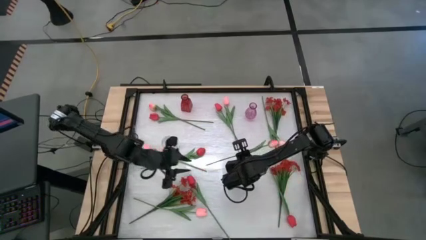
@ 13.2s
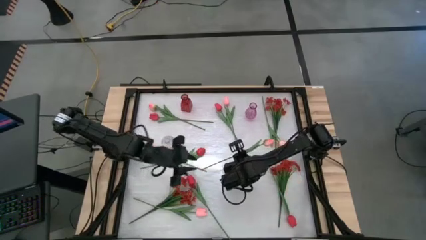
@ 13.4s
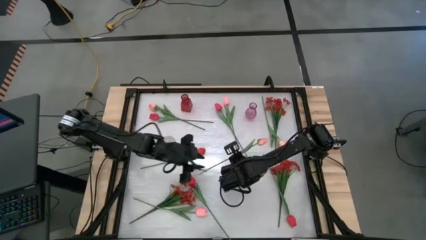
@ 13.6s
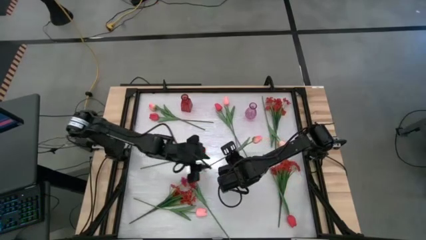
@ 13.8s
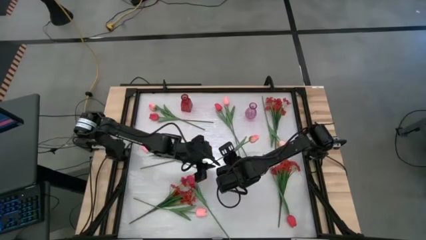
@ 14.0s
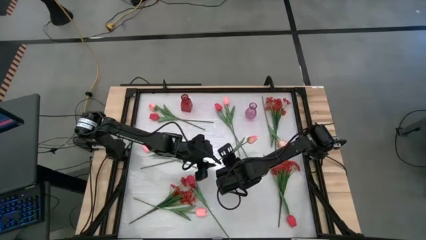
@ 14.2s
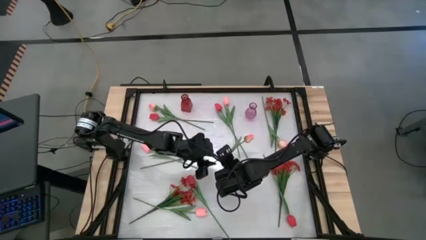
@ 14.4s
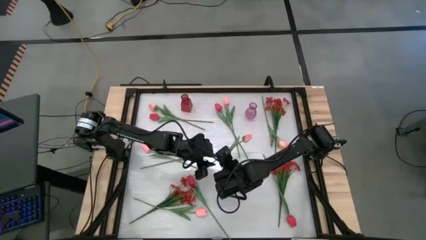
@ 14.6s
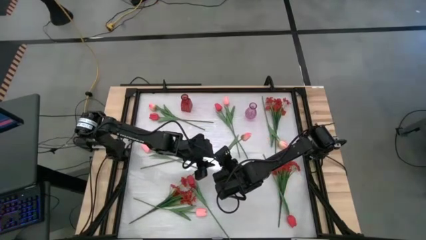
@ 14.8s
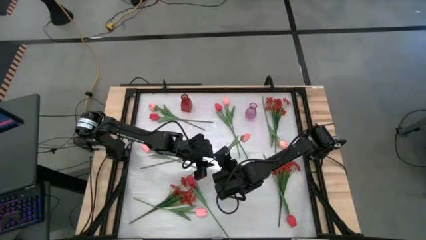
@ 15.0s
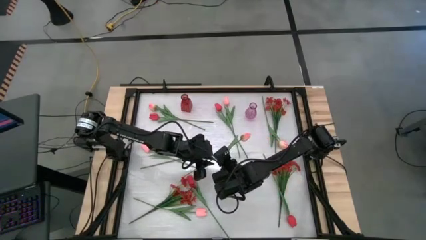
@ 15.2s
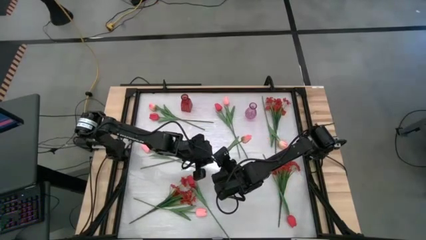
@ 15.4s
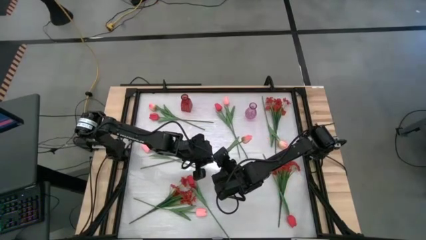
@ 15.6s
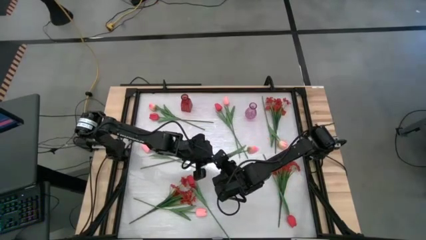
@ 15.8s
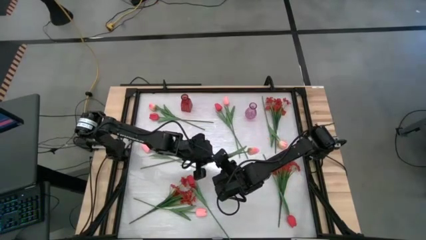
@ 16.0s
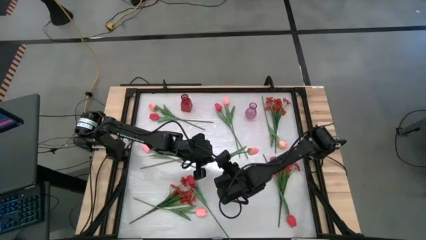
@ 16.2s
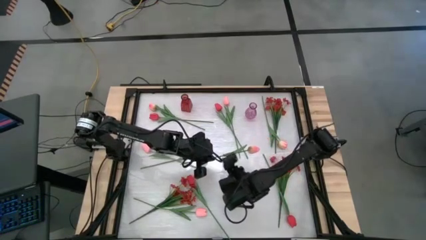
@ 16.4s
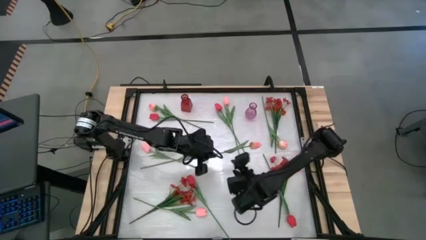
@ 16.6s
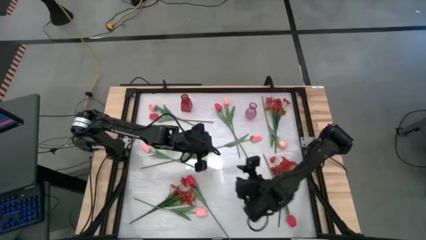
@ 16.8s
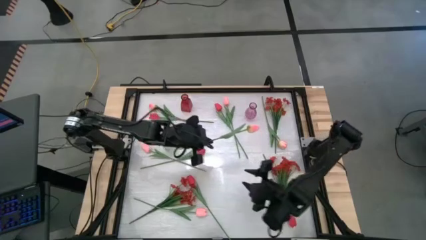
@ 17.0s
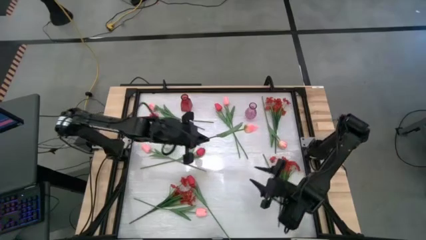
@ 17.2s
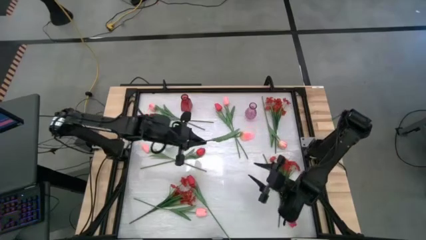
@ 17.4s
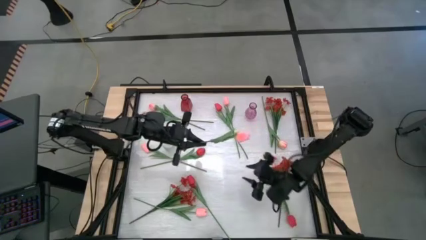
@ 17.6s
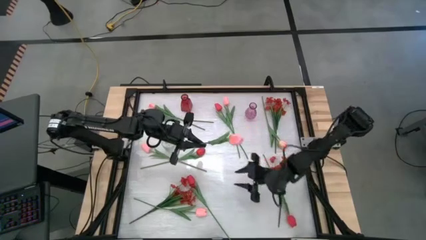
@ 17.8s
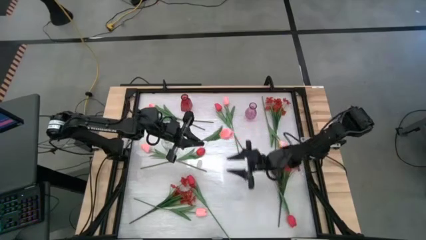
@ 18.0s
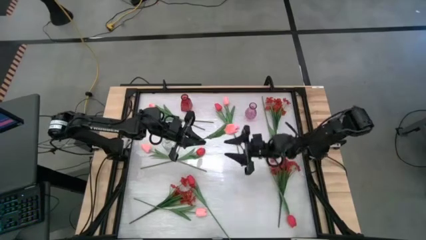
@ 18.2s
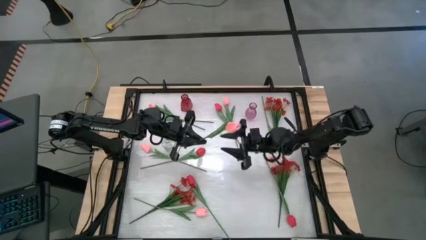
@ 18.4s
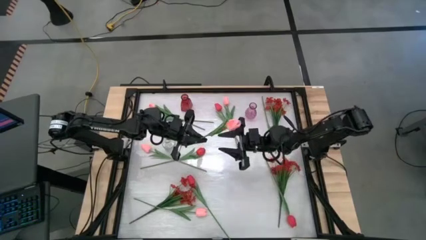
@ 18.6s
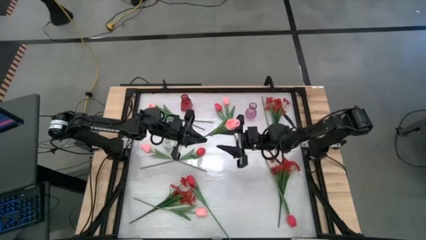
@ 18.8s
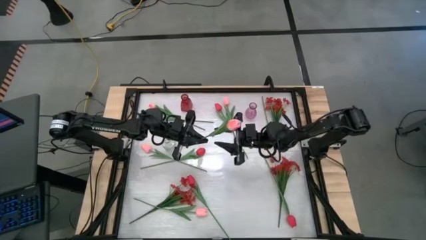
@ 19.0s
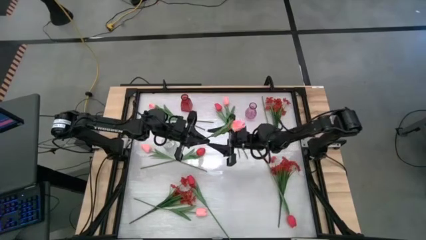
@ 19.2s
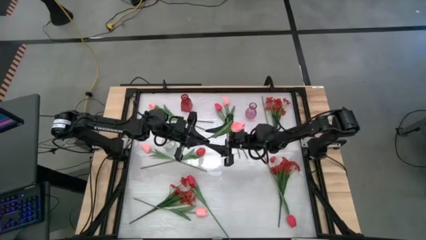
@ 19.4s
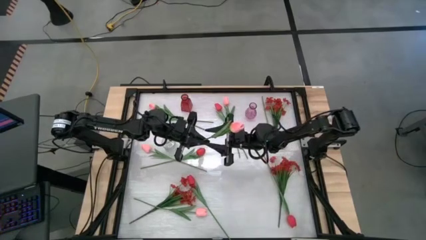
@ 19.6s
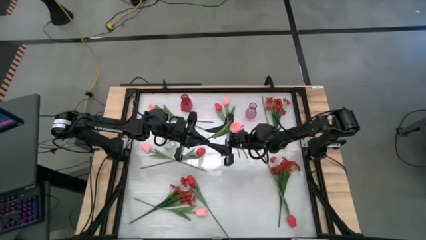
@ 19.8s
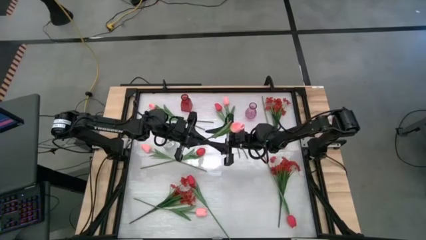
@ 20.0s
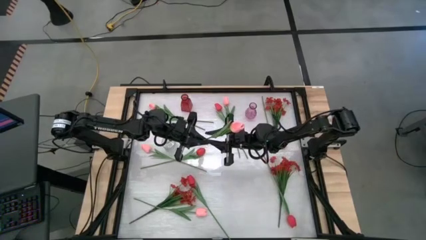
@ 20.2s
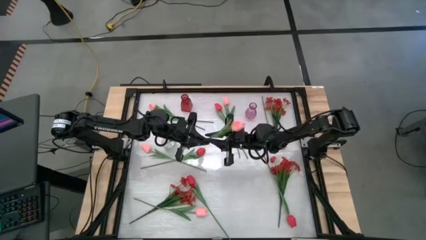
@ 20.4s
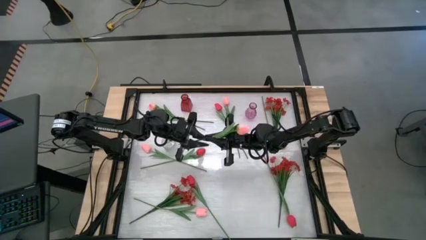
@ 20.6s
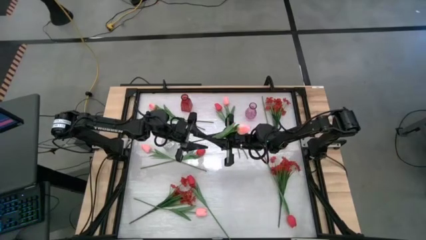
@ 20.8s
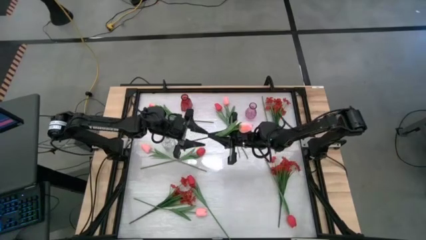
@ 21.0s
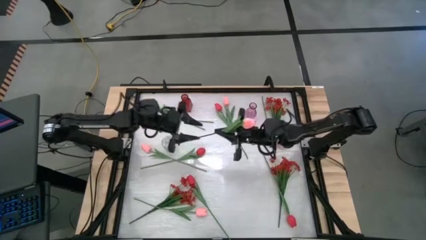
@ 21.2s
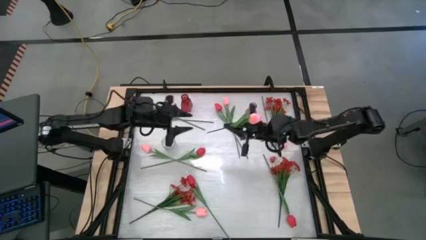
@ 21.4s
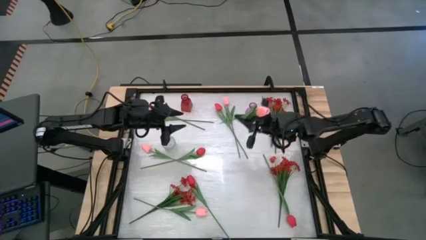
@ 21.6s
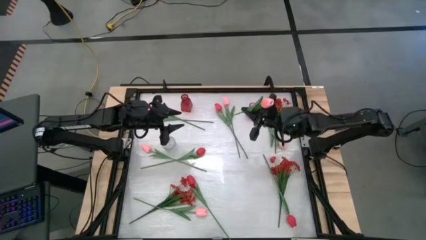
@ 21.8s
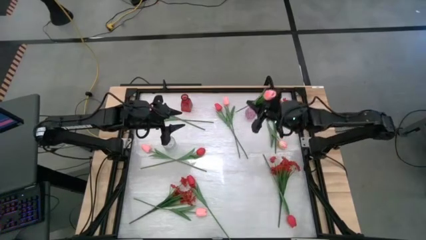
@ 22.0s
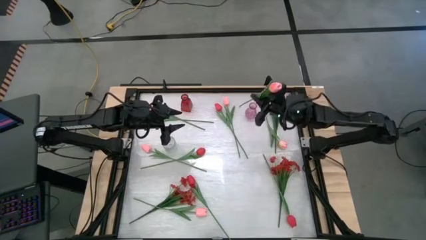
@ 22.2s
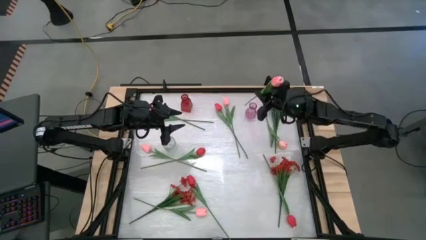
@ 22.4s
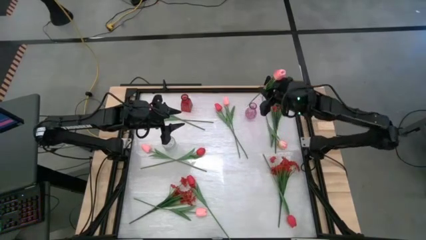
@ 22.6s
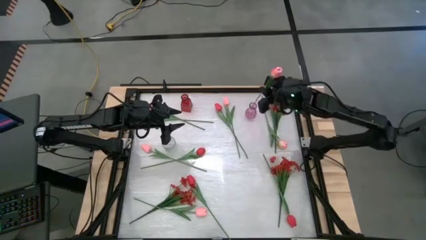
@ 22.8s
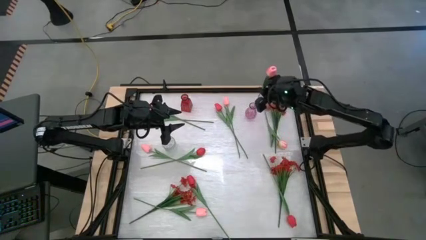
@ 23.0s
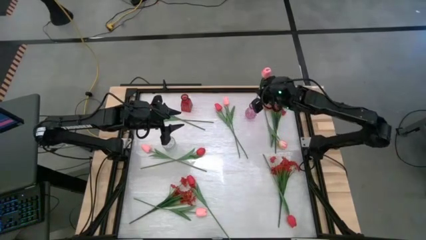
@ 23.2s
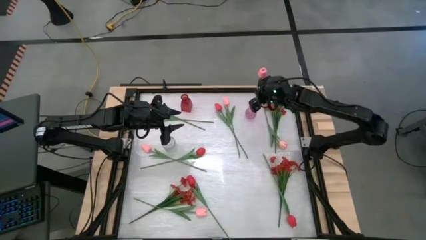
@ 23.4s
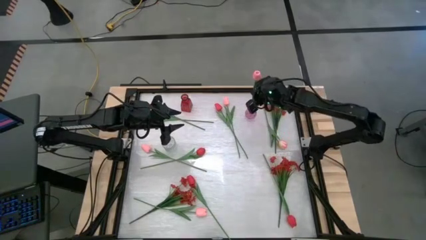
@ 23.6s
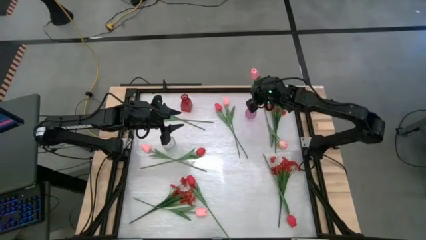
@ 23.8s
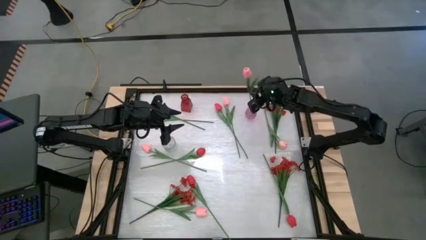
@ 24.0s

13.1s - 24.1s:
Task: Sort flowers into vase by color
Put the pink tulip into the purple vase

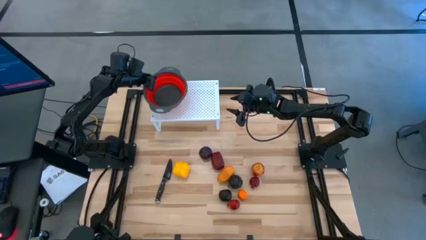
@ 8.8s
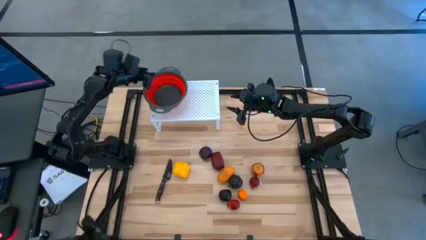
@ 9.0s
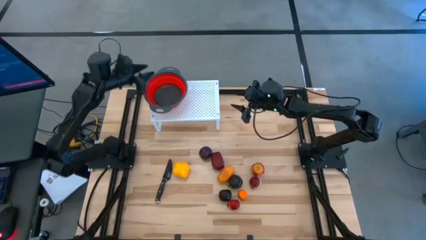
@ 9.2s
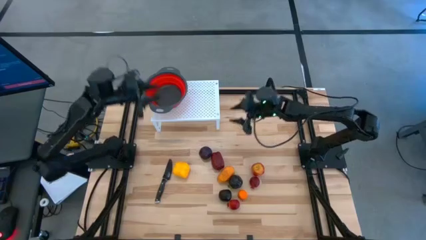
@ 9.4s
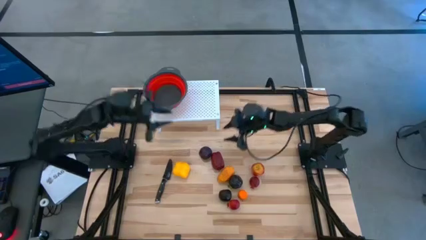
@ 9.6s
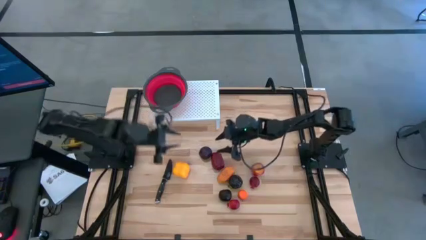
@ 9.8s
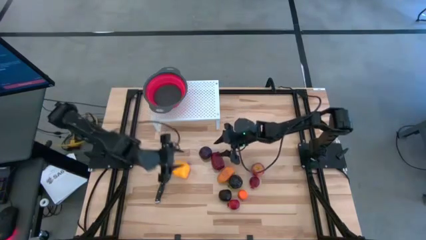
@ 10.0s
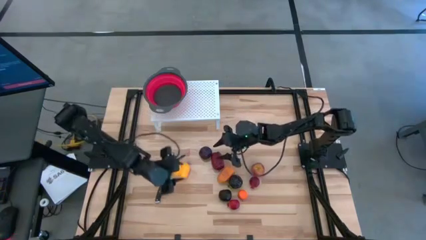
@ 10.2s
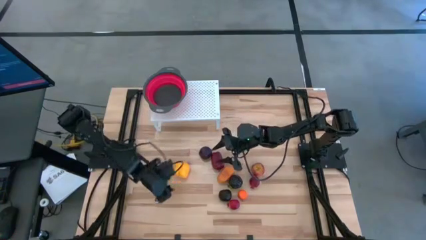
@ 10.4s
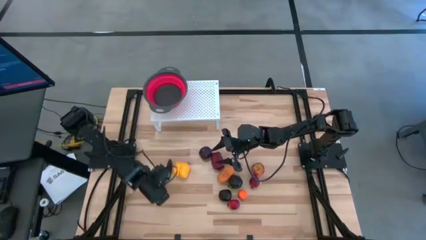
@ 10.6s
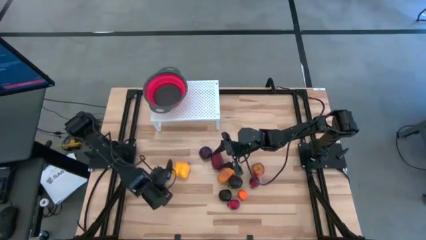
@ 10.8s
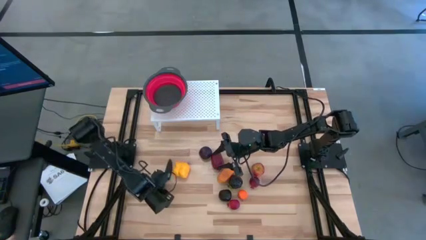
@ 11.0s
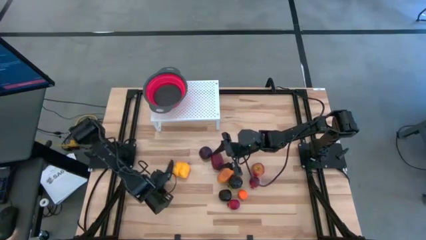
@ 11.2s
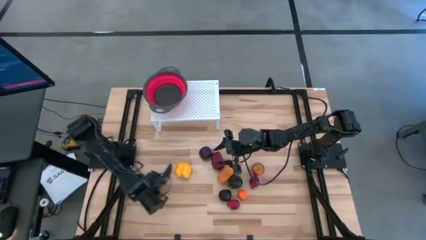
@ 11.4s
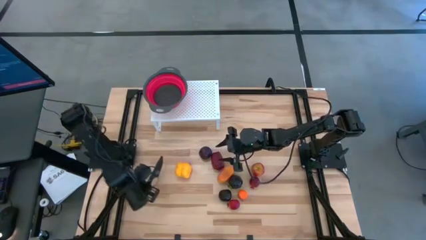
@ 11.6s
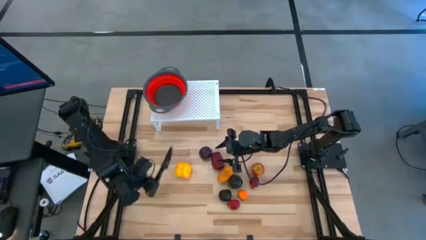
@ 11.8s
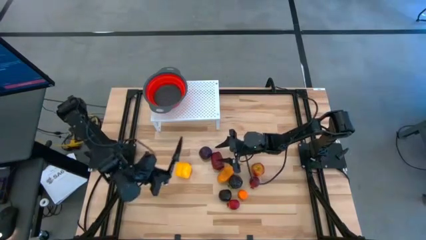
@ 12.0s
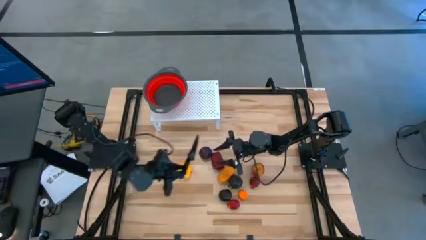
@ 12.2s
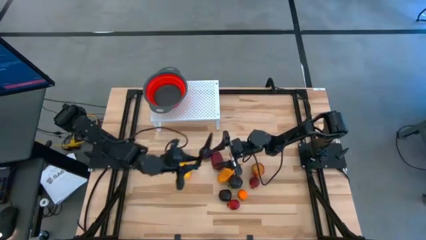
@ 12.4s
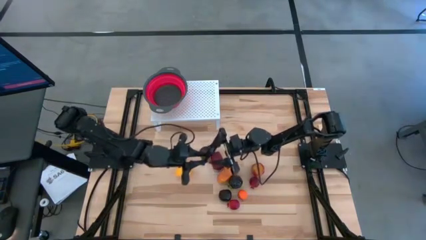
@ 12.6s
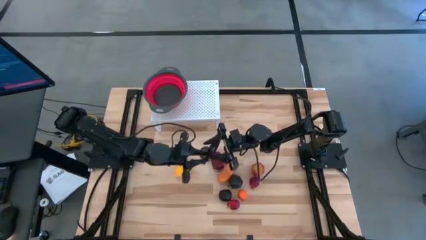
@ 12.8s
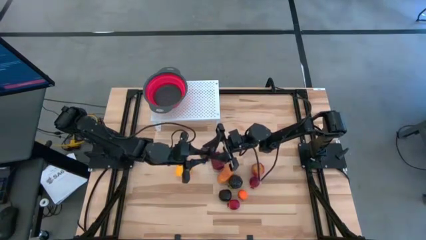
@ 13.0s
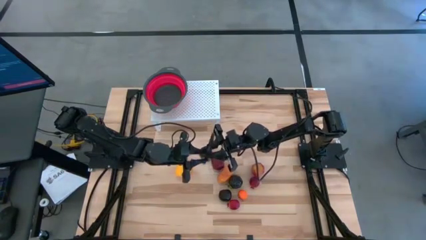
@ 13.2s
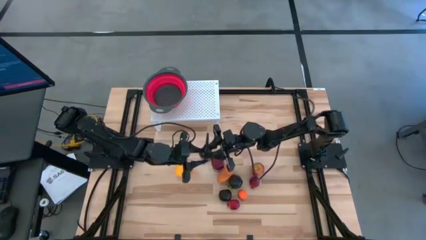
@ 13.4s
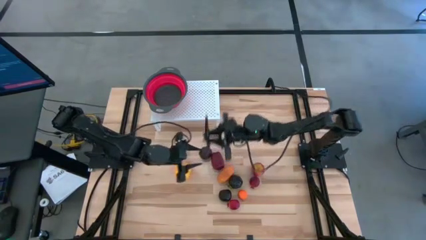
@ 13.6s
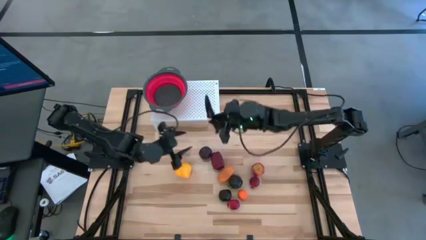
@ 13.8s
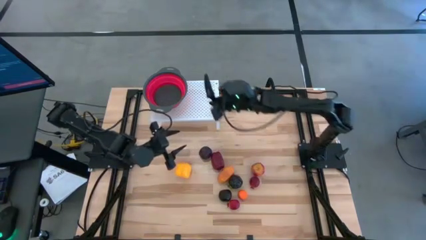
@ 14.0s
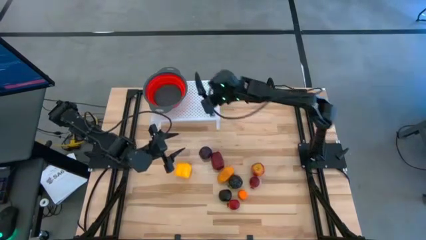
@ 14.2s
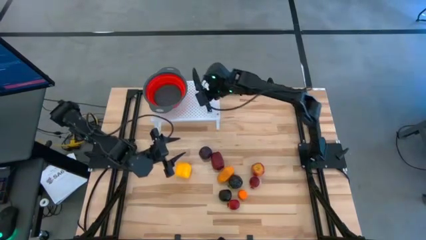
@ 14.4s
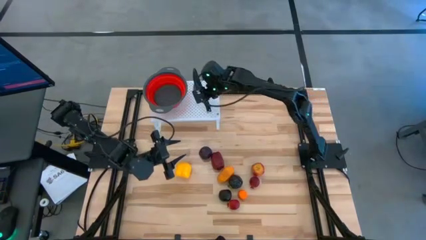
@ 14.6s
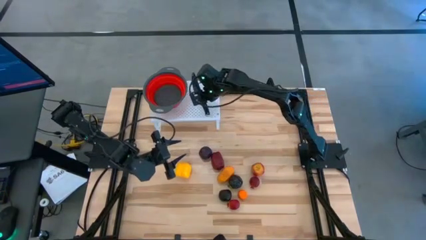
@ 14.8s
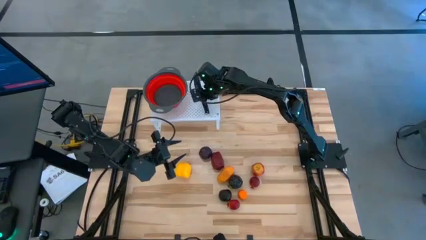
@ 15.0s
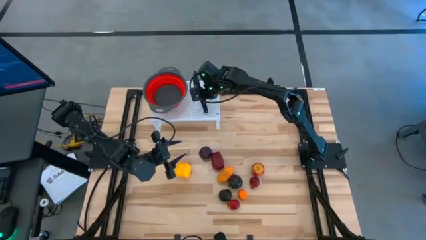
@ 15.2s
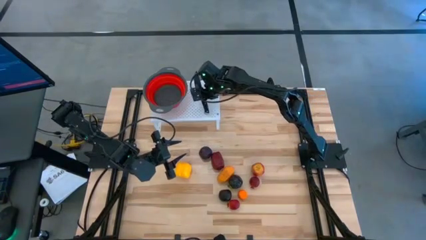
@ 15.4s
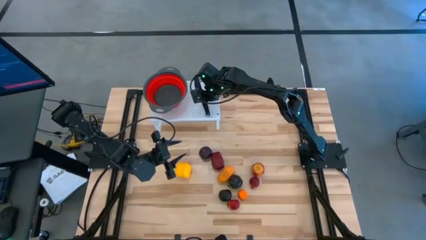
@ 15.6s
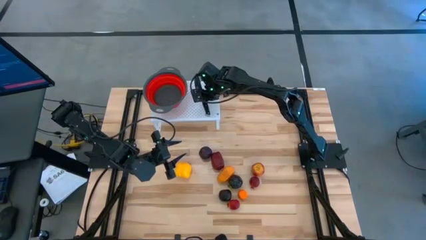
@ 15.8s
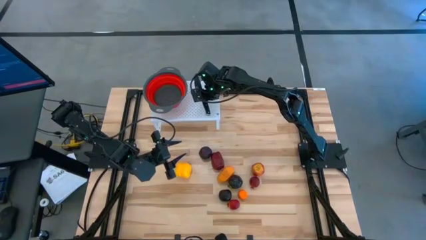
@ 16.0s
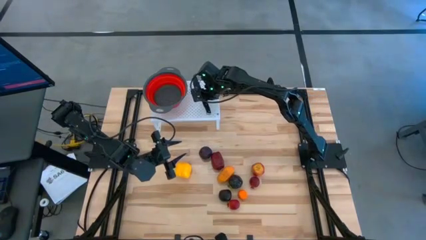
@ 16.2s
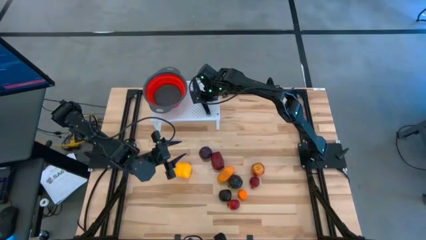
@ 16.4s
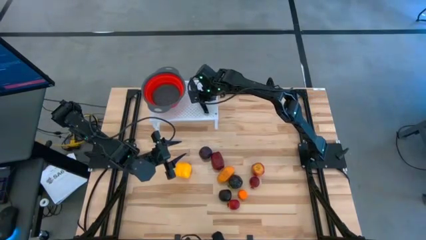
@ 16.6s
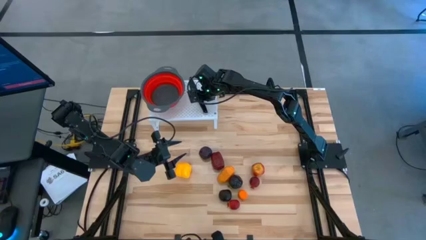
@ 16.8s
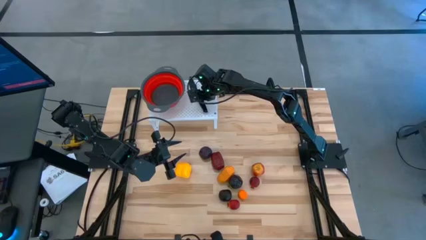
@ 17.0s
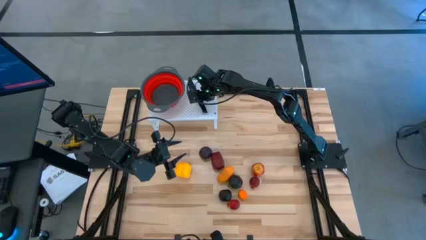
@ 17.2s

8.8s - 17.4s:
Task: Pick & Place Fruit
Put the black knife on the shelf
